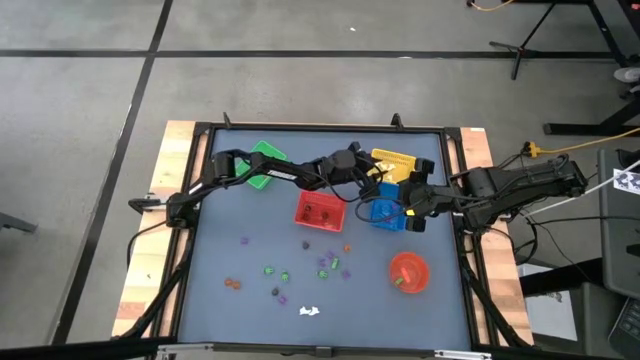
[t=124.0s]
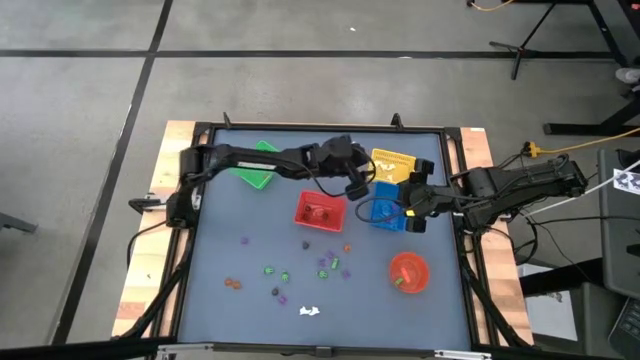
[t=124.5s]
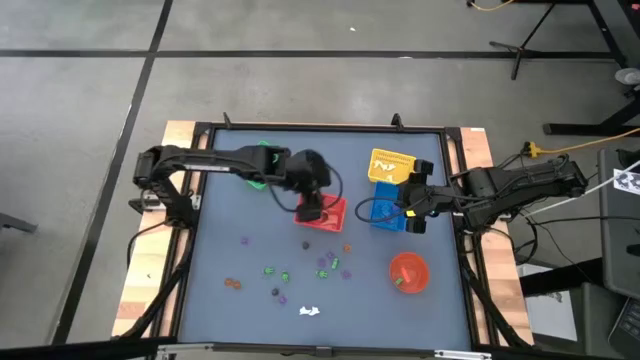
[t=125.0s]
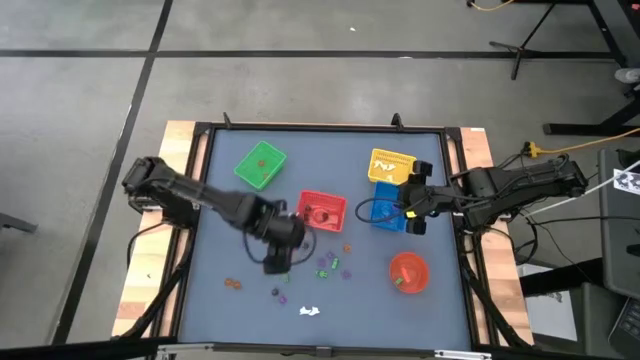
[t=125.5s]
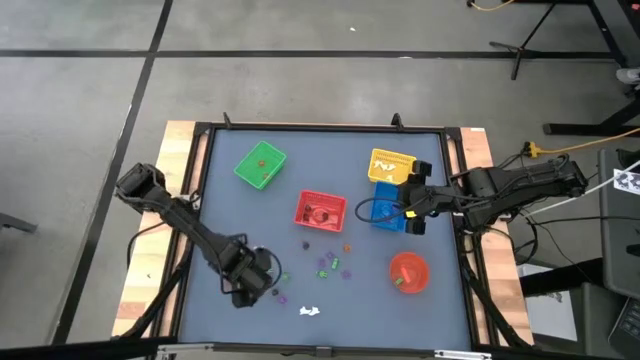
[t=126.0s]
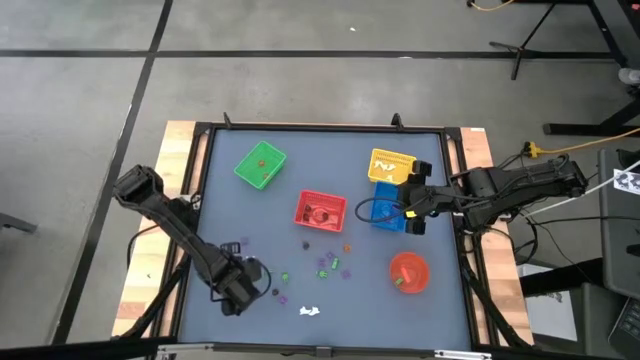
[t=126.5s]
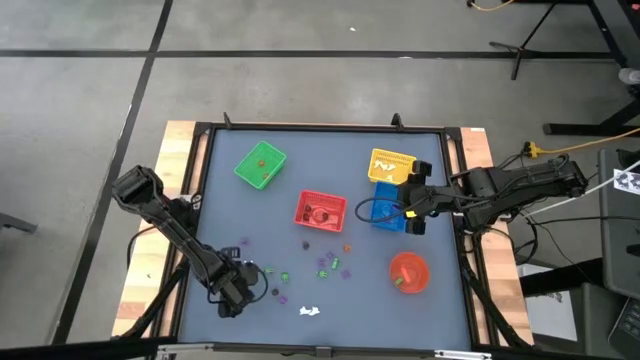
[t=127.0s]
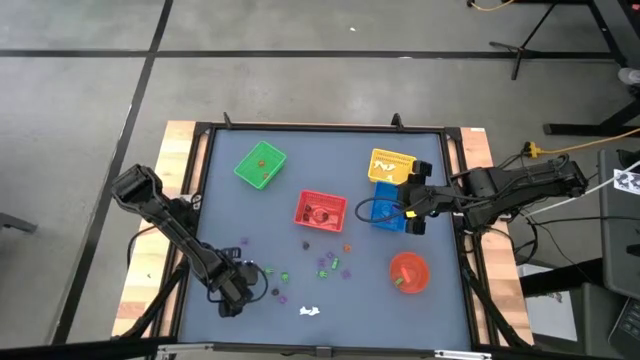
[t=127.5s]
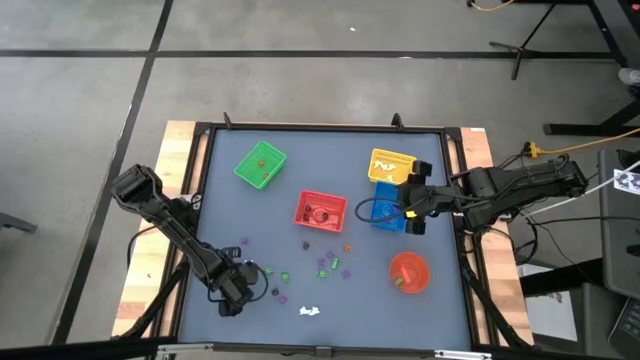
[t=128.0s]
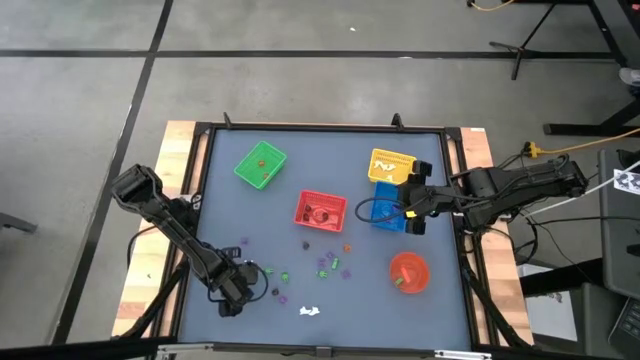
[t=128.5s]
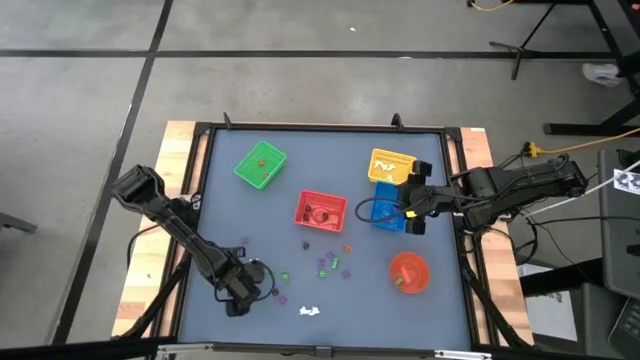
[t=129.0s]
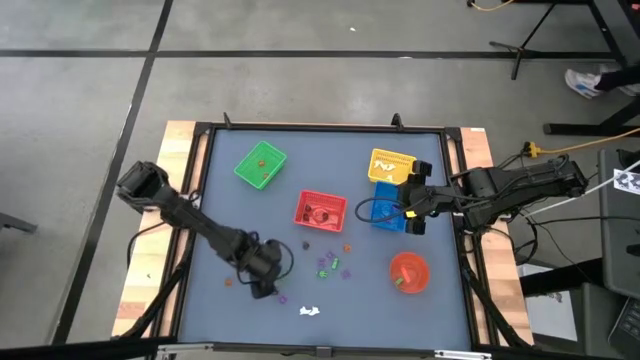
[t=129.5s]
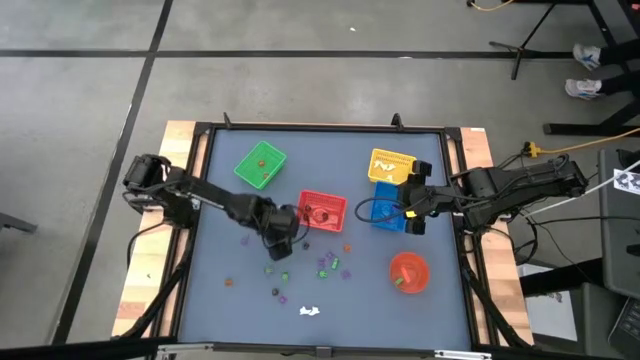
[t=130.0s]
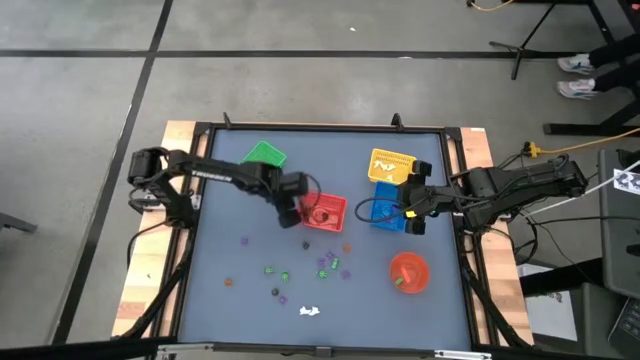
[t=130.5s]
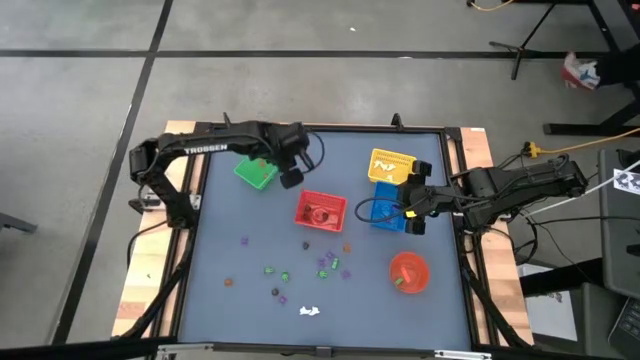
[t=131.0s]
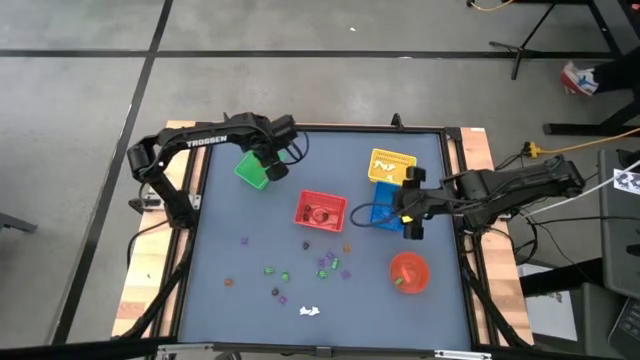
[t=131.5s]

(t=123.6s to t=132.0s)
Task: Sort Halloween decoration
Put the orange pumpkin toy into the green bin

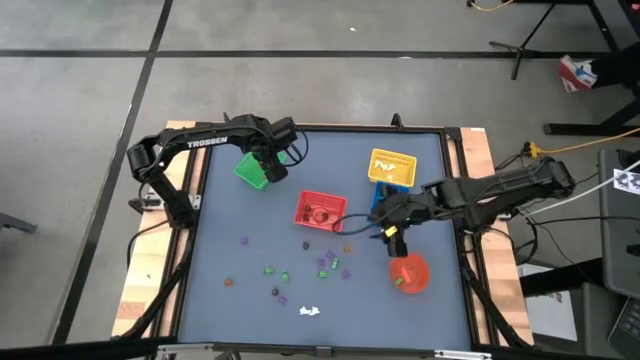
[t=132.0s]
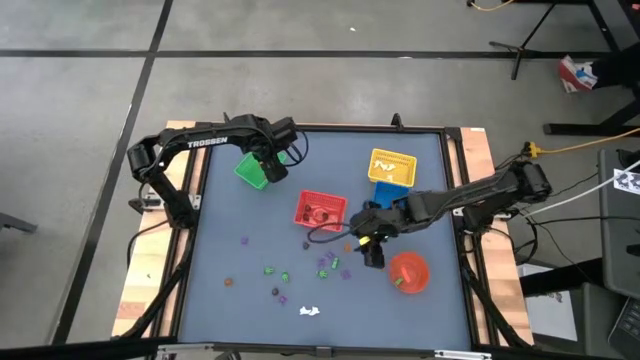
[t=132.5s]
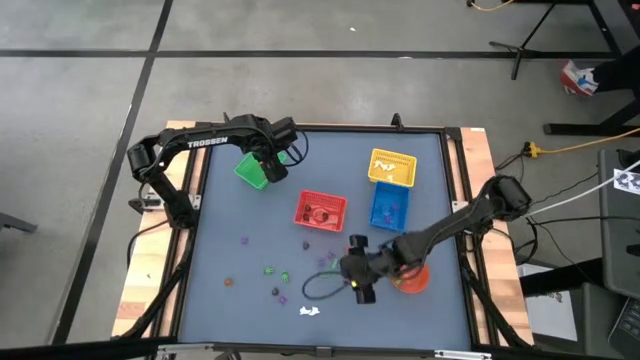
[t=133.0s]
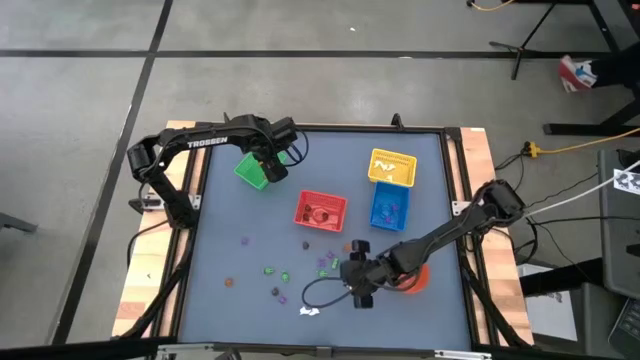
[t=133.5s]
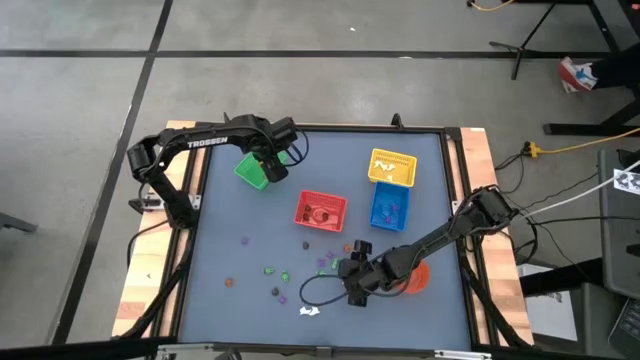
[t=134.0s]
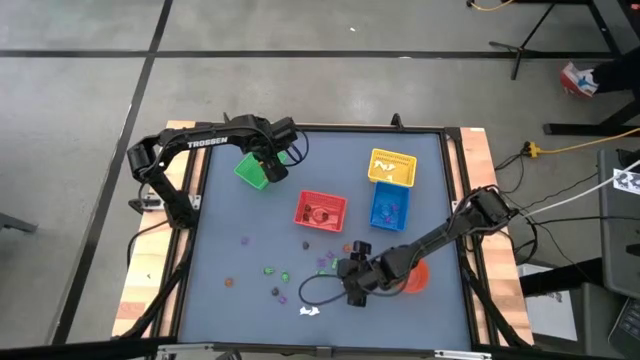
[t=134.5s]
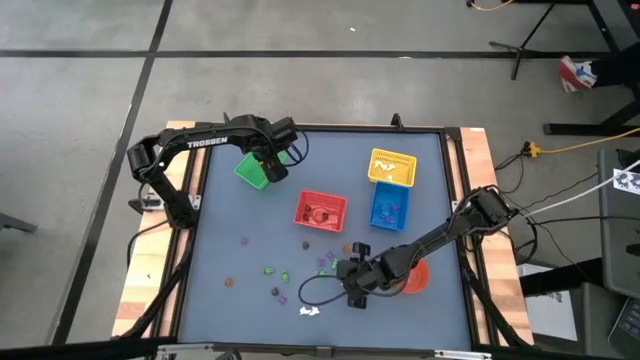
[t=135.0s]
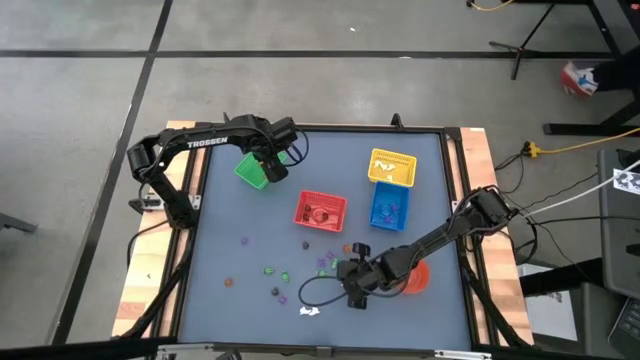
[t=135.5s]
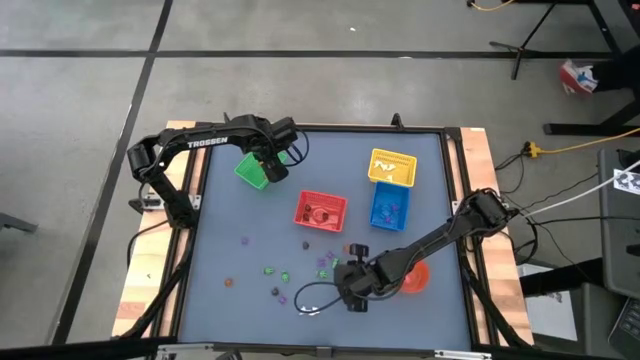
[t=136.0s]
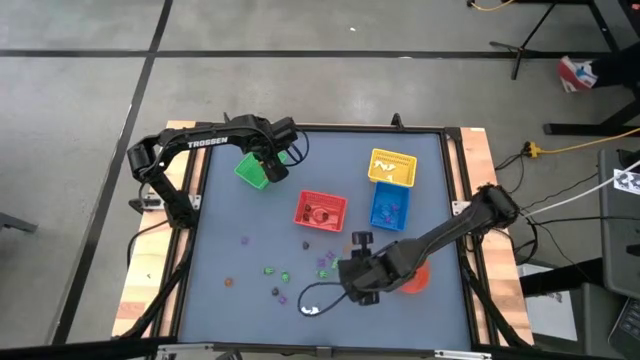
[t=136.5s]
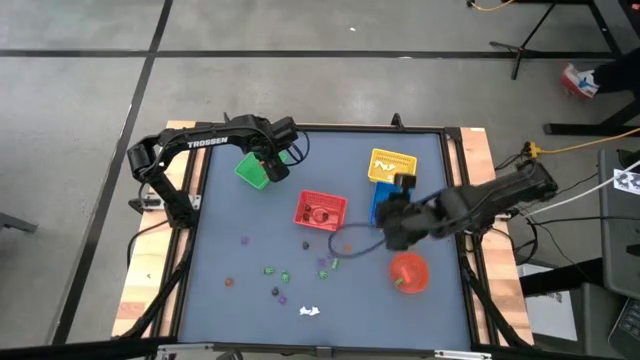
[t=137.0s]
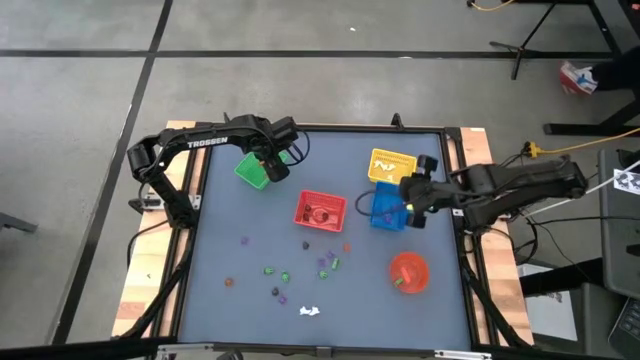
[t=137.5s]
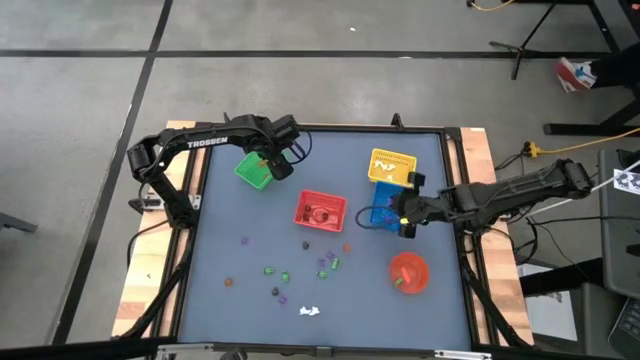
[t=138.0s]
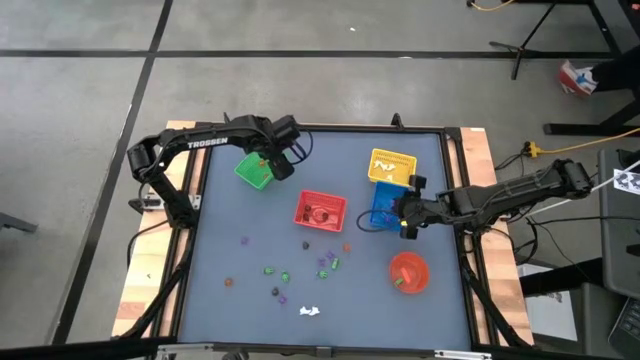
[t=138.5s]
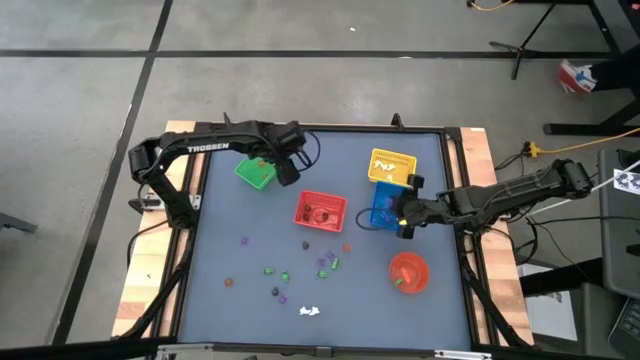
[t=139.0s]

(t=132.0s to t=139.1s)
Put the violet spider toy into the blue bin

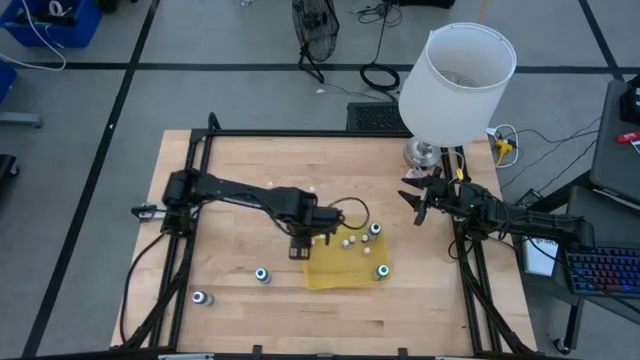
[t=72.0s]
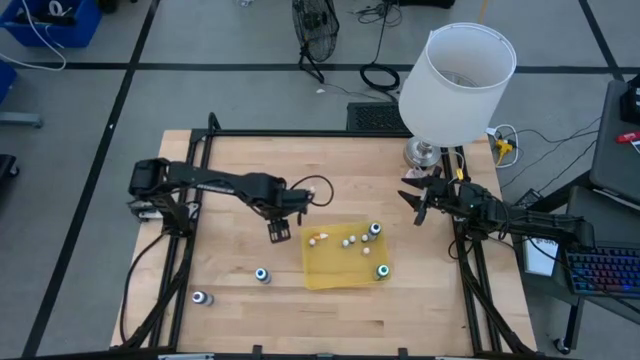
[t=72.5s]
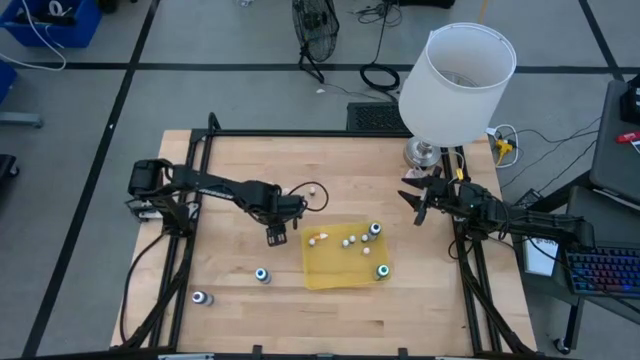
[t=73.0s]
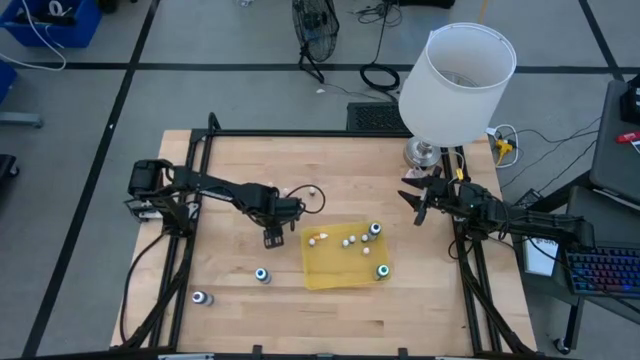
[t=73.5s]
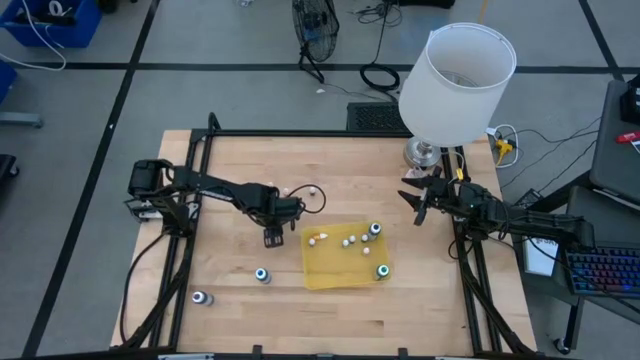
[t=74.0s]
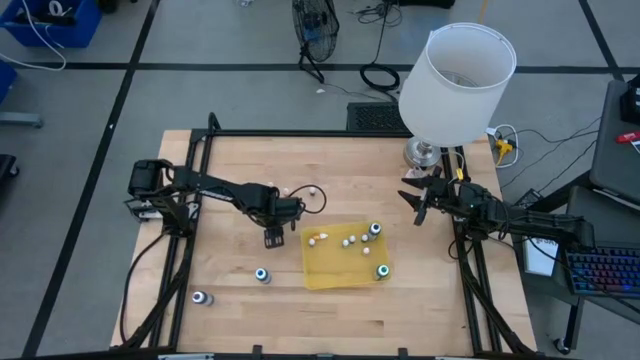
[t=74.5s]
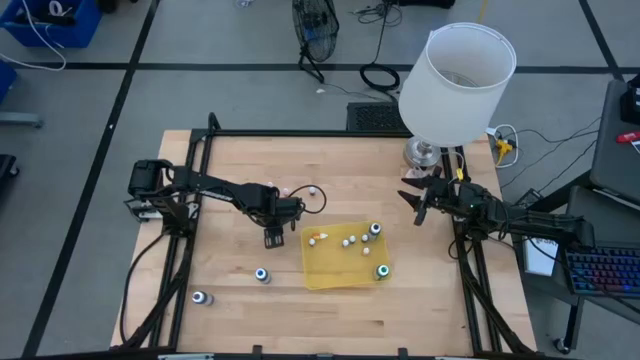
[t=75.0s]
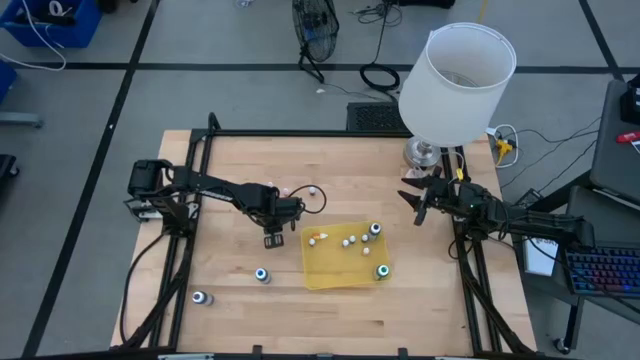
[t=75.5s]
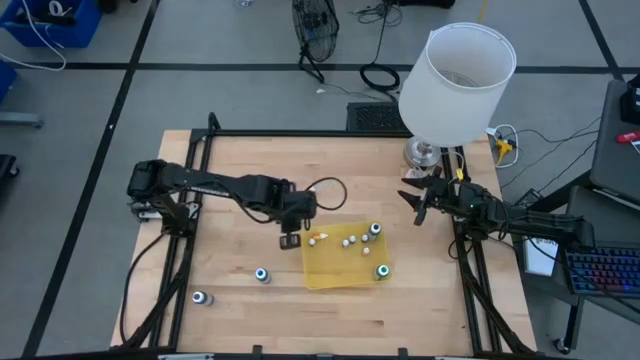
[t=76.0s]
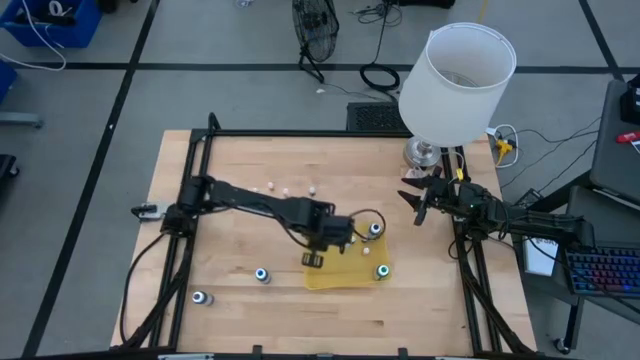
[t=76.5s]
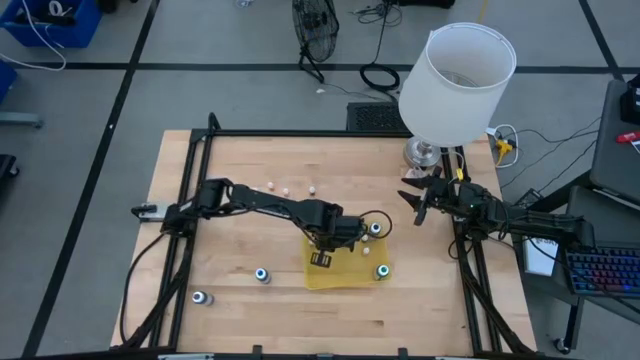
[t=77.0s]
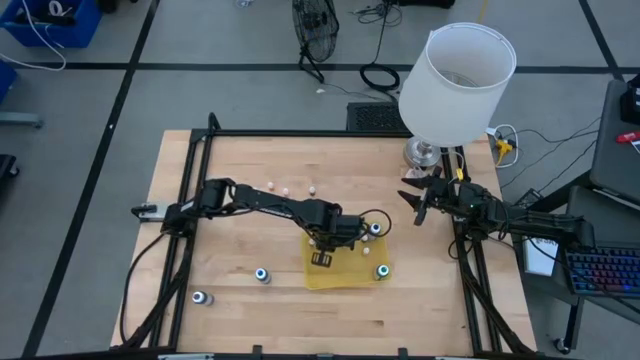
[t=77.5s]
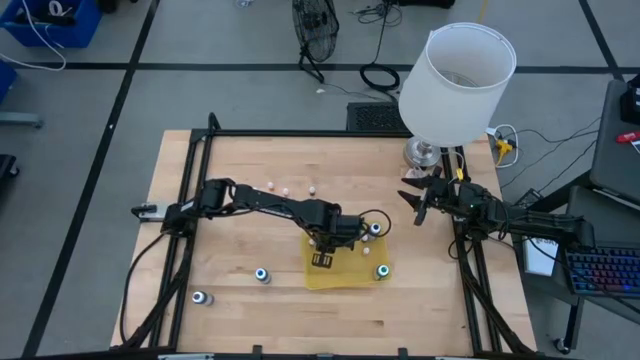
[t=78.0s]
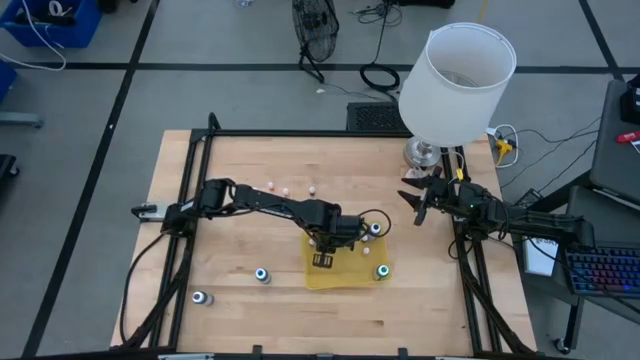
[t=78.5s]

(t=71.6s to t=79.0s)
Task: Pick & Place food coloring
Put the right small black food coloring bottle into the yellow bin
